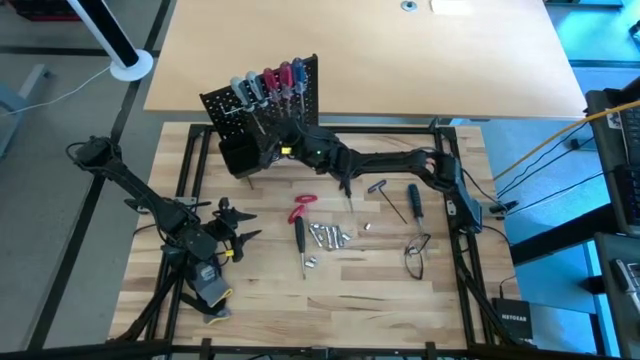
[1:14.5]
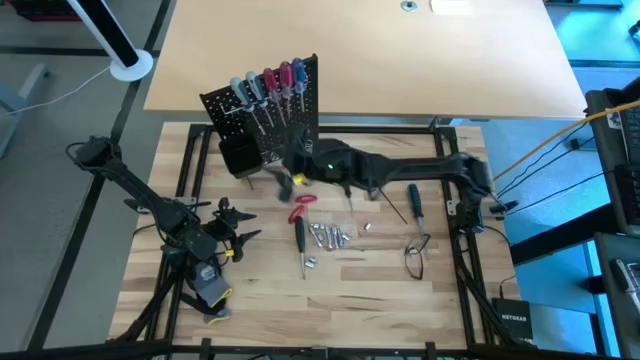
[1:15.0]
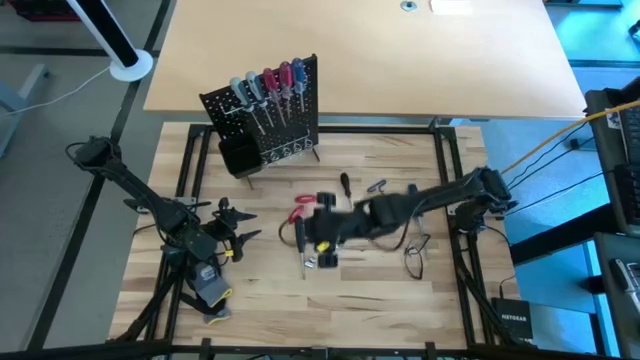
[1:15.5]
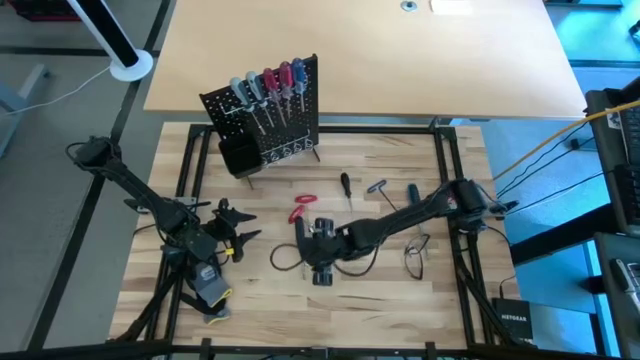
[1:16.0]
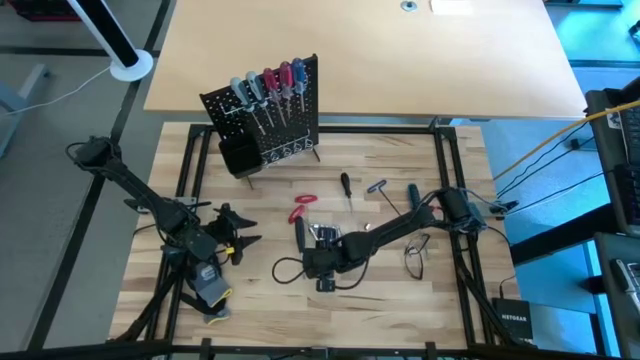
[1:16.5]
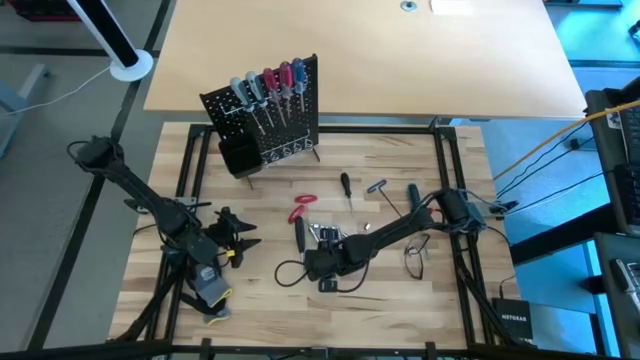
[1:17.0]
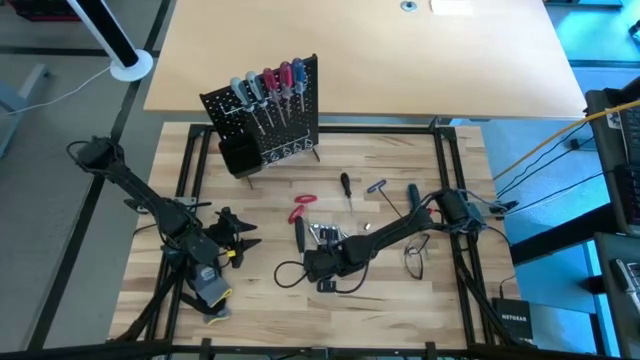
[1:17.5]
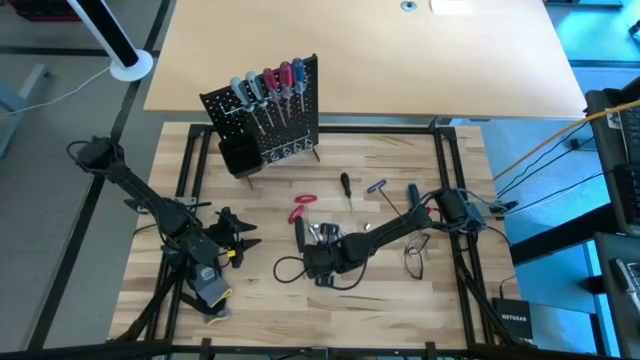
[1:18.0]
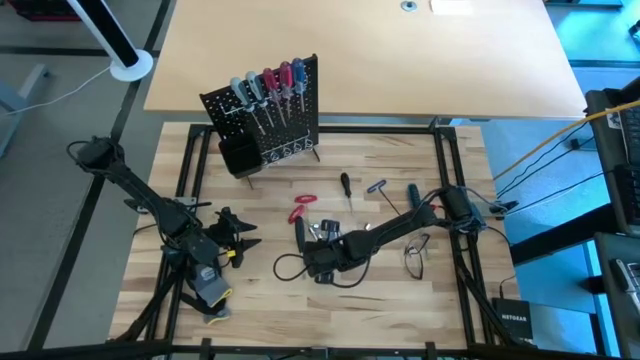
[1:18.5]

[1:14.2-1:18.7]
Task: Hang tools onto peg board
Put the socket into the black bin on the peg board

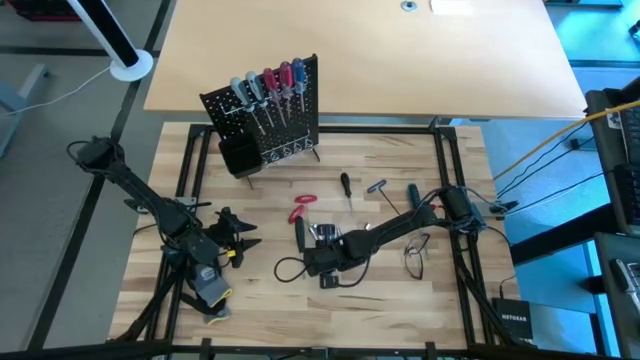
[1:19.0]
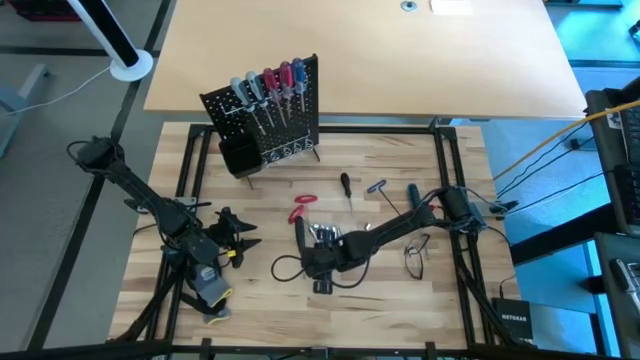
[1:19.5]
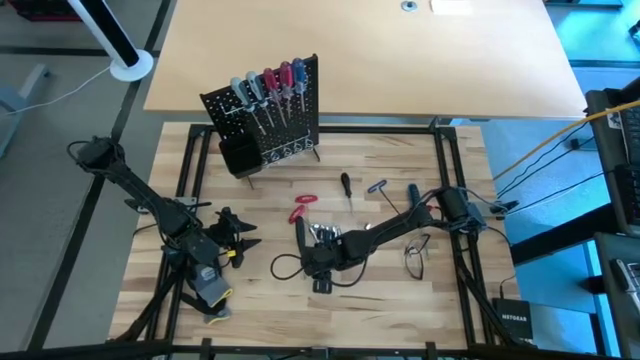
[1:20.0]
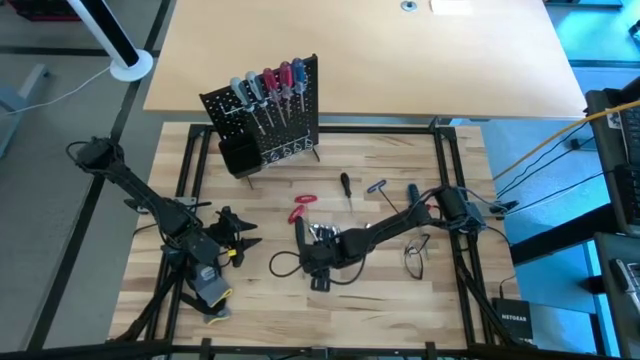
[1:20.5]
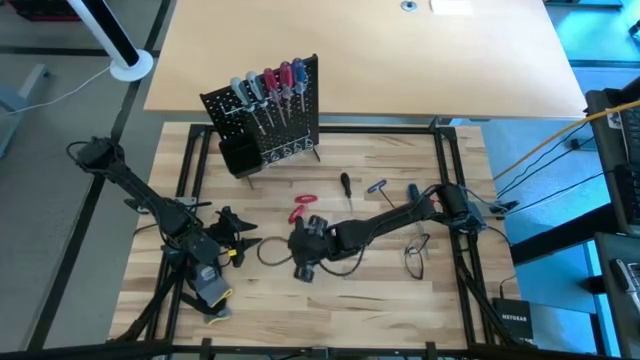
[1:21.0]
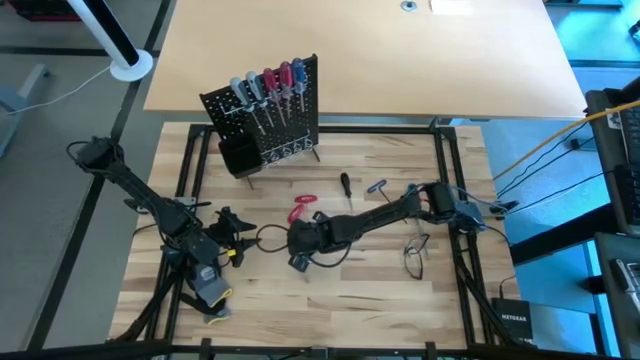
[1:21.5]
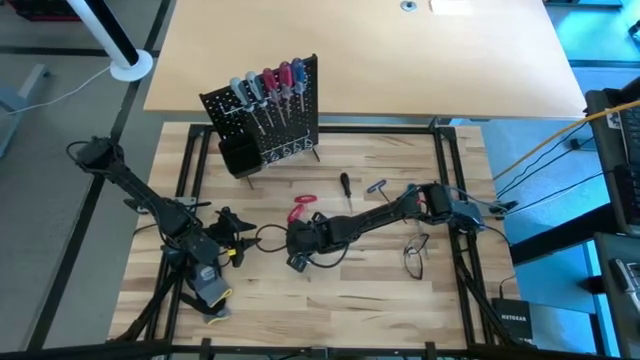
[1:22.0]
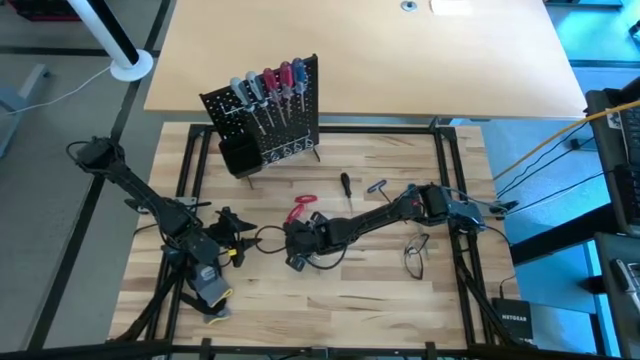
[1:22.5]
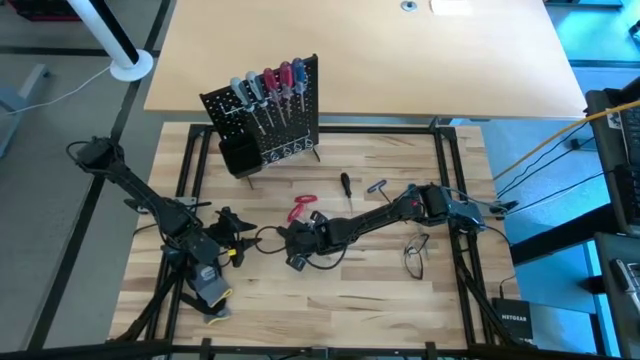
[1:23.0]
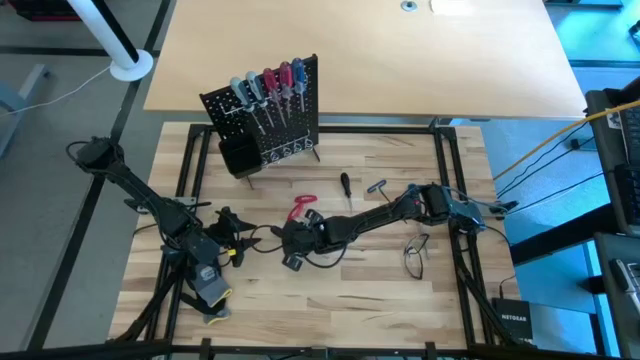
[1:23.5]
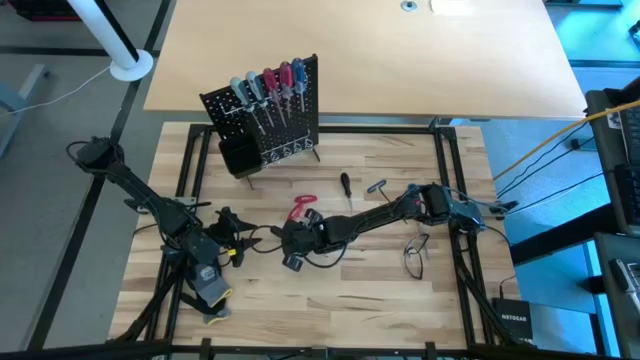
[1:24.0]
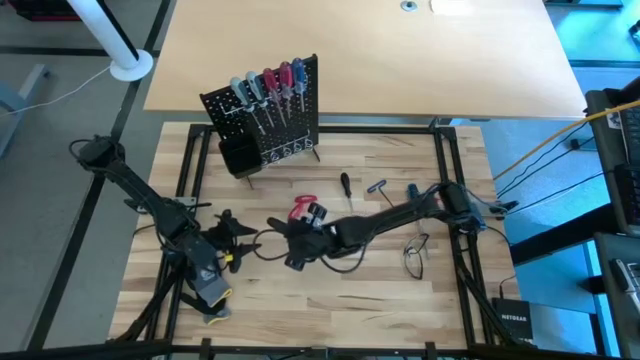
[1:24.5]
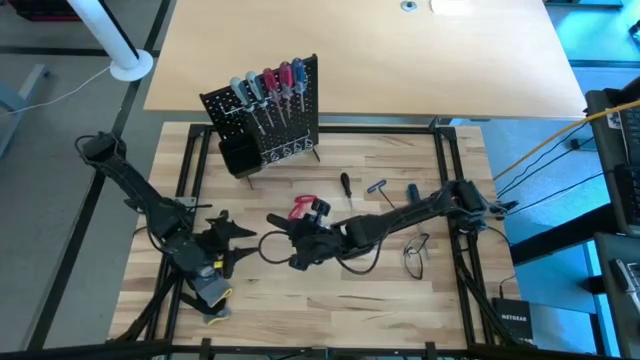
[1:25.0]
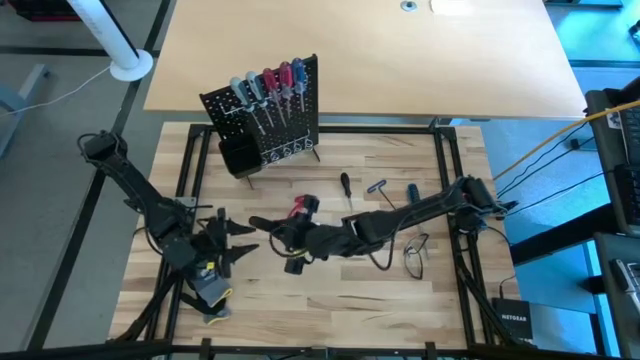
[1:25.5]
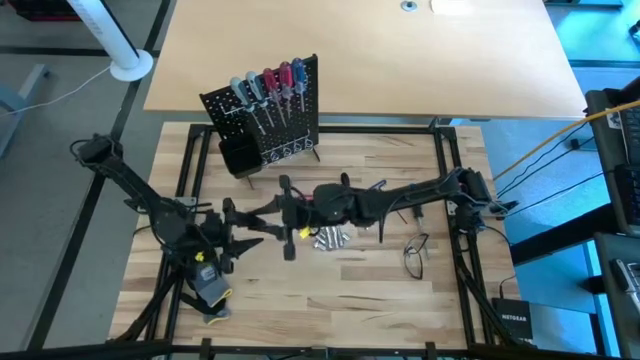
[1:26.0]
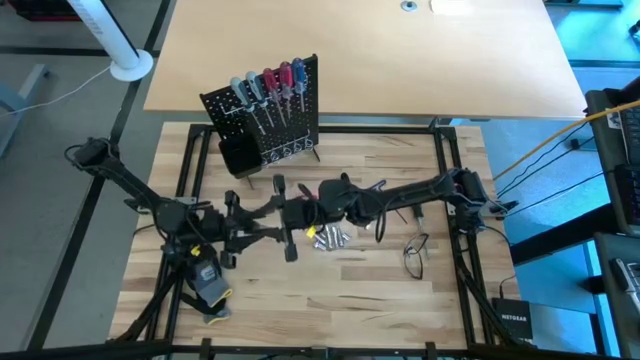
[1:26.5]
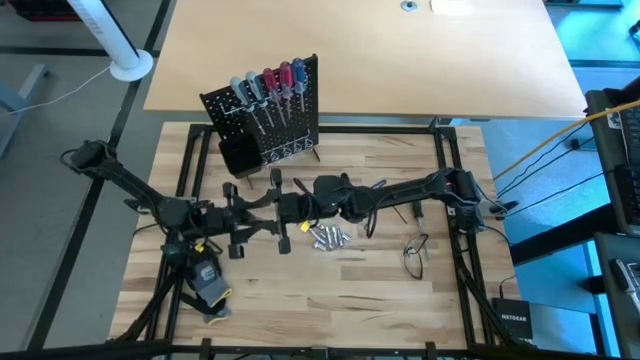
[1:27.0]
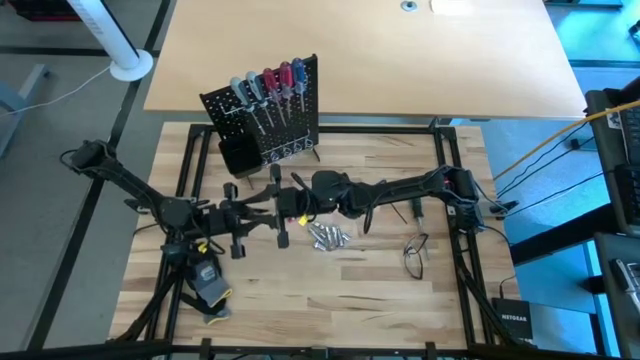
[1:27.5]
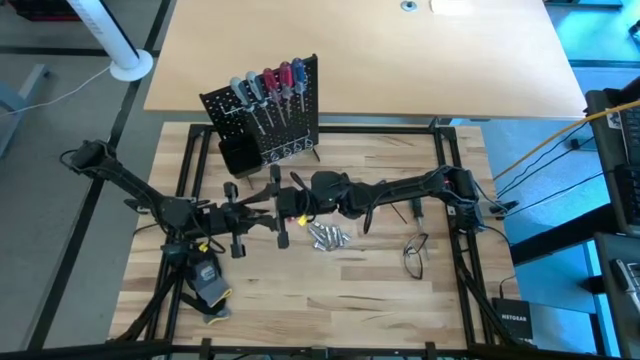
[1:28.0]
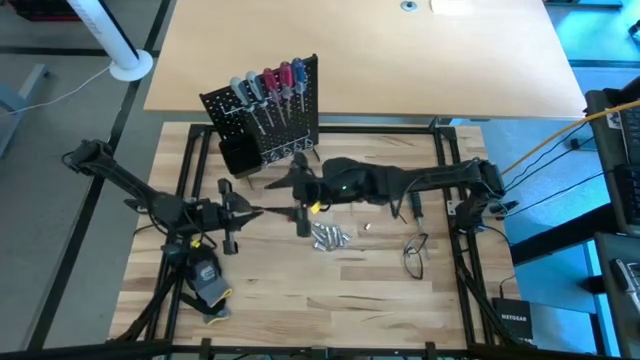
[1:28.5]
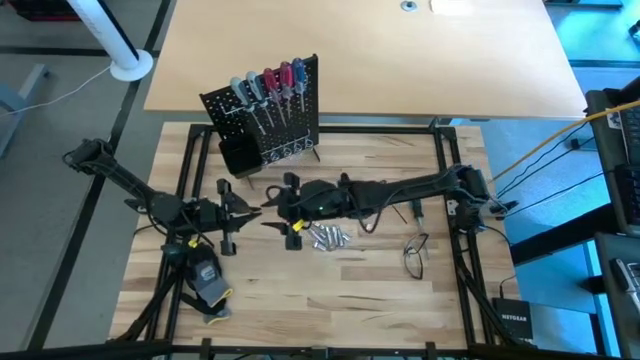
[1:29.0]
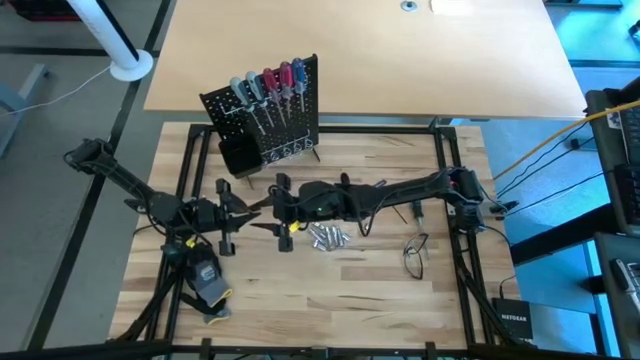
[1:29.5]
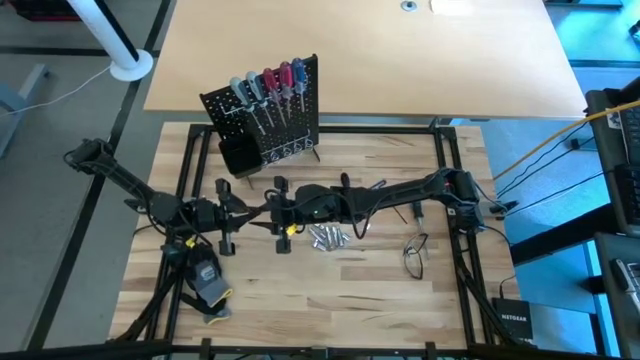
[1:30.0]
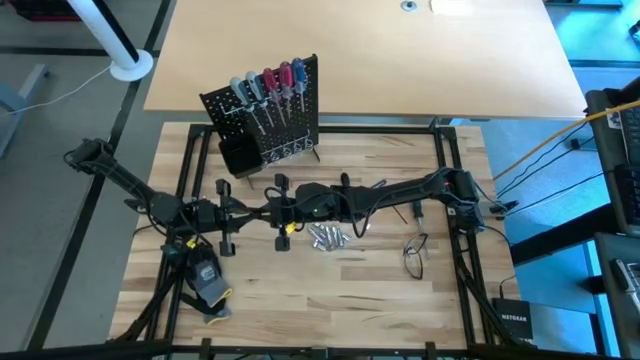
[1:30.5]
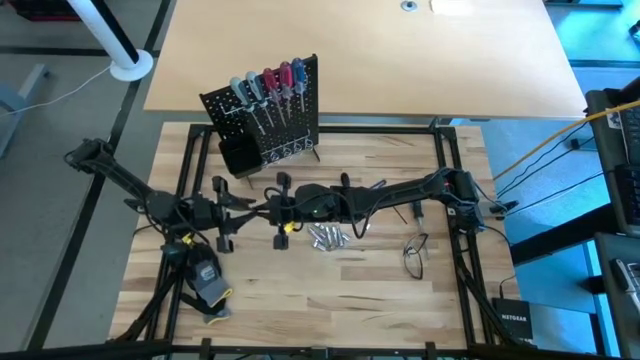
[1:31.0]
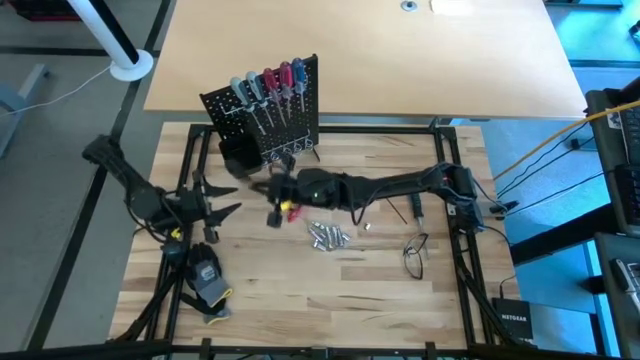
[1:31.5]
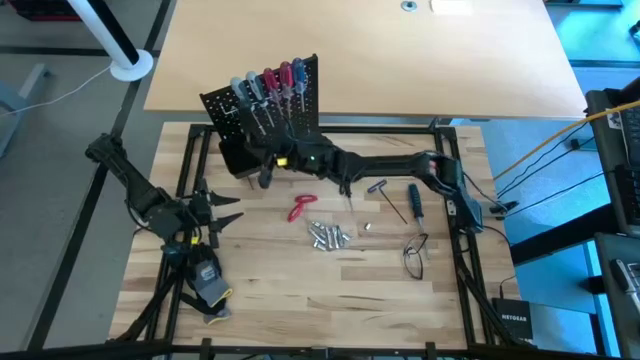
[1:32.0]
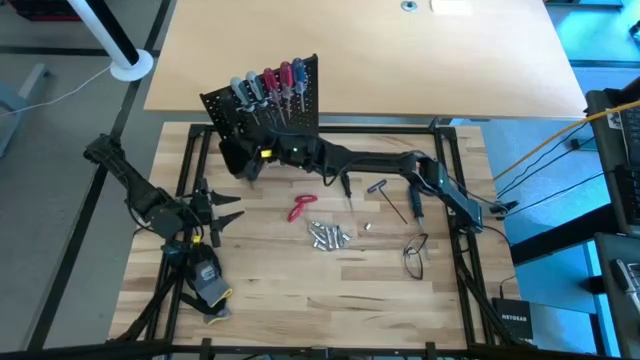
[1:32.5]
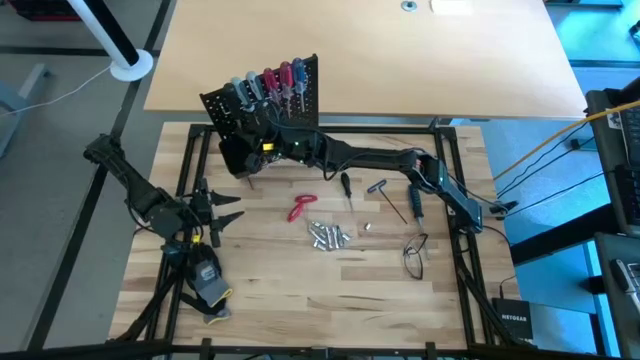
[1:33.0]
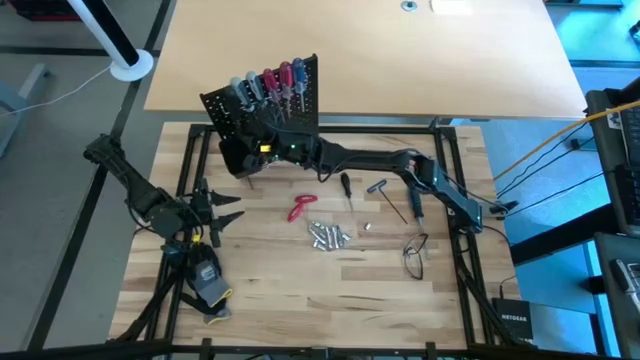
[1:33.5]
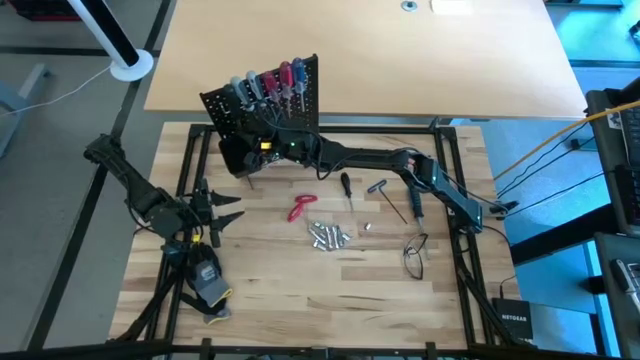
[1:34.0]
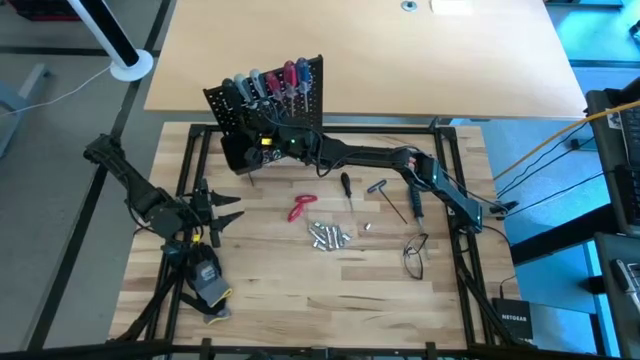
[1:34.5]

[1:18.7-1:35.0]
Hang the black screwdriver onto the peg board
